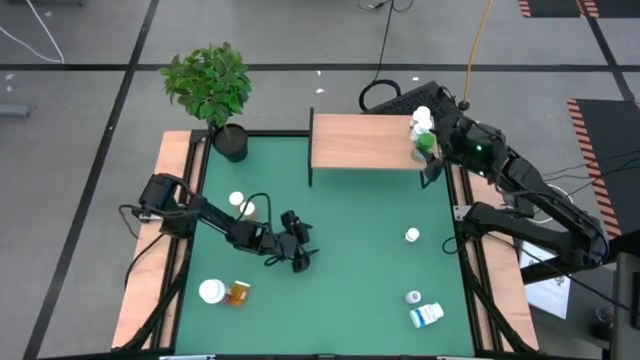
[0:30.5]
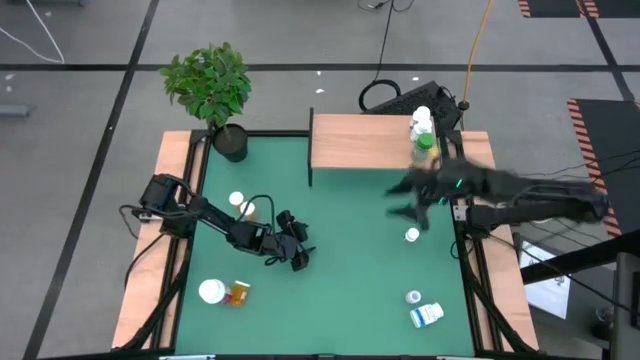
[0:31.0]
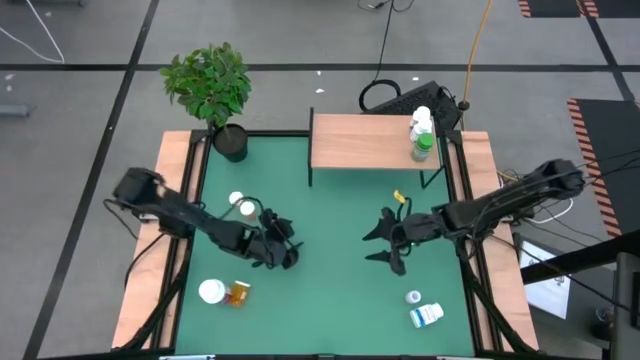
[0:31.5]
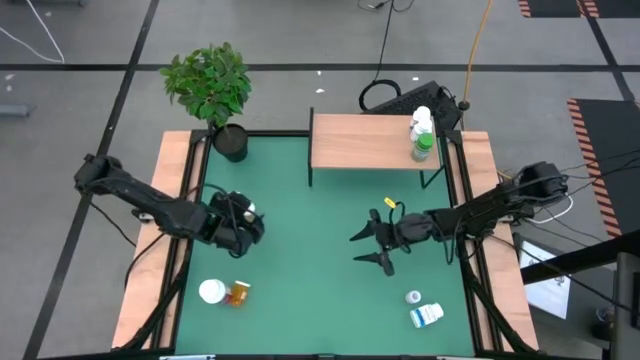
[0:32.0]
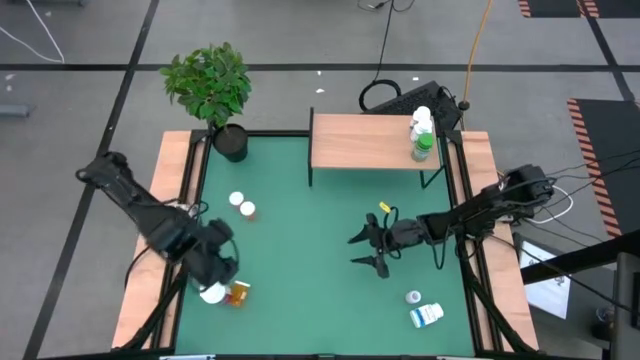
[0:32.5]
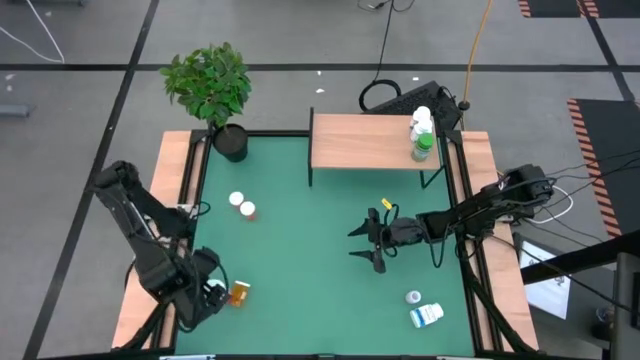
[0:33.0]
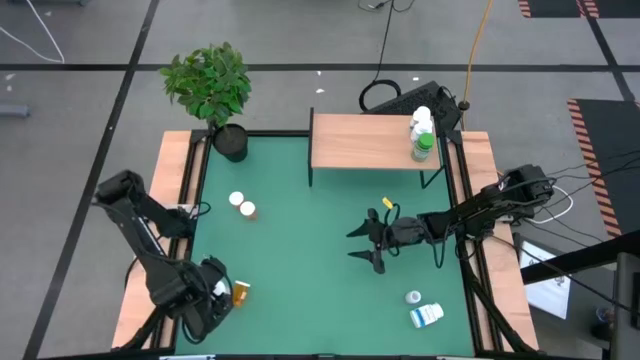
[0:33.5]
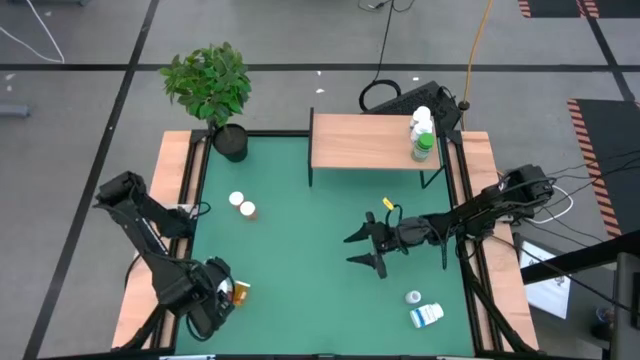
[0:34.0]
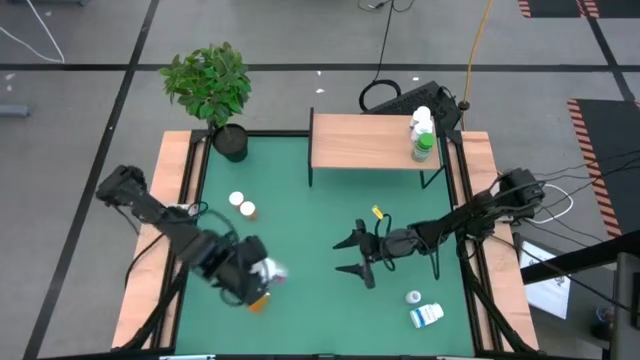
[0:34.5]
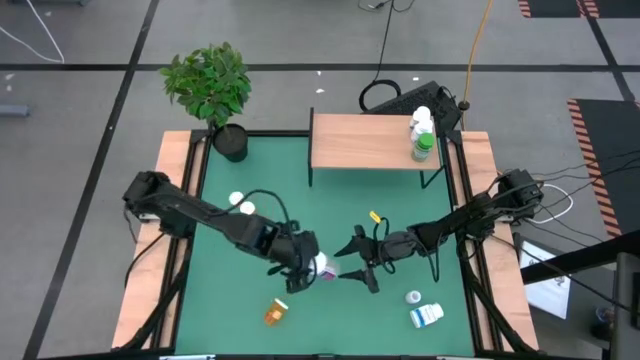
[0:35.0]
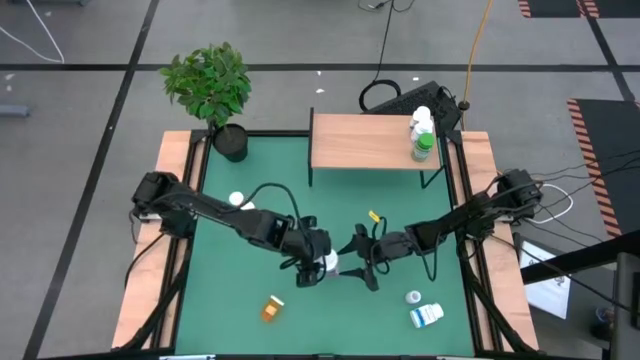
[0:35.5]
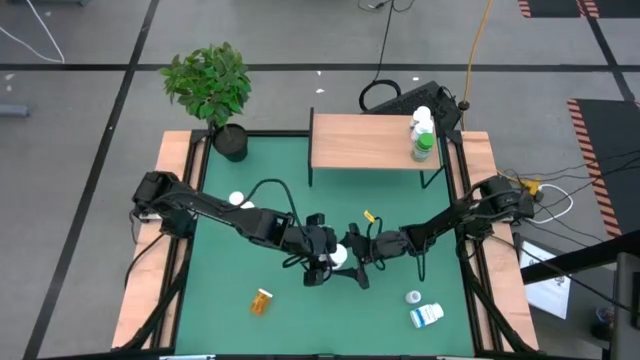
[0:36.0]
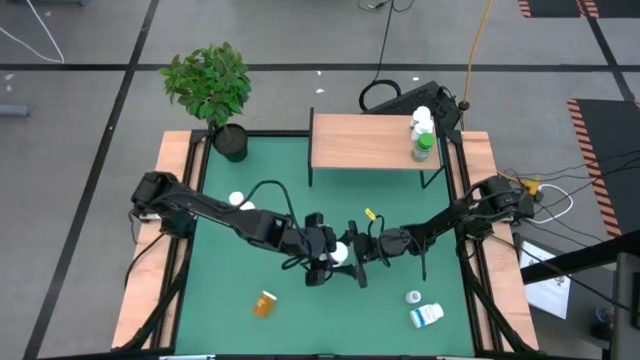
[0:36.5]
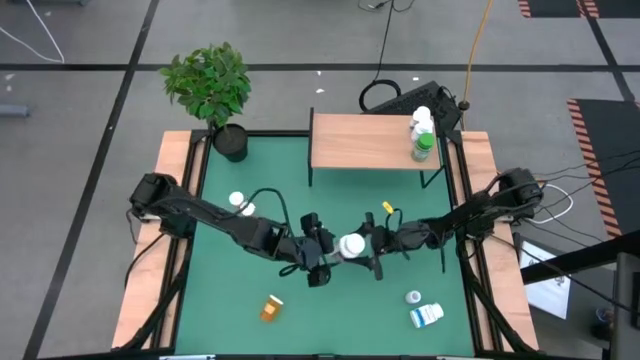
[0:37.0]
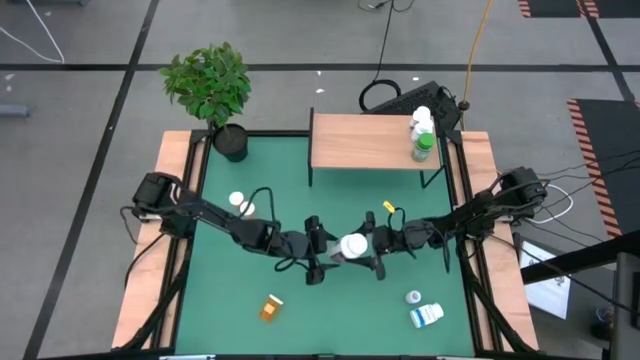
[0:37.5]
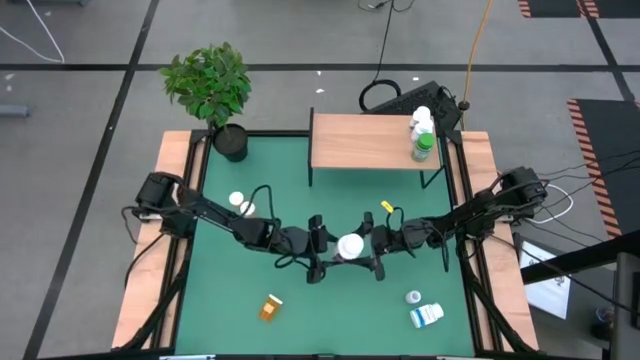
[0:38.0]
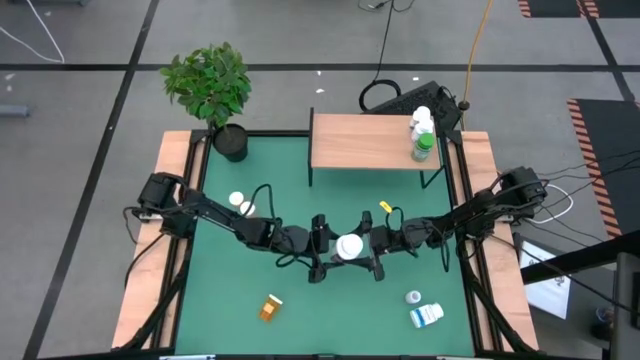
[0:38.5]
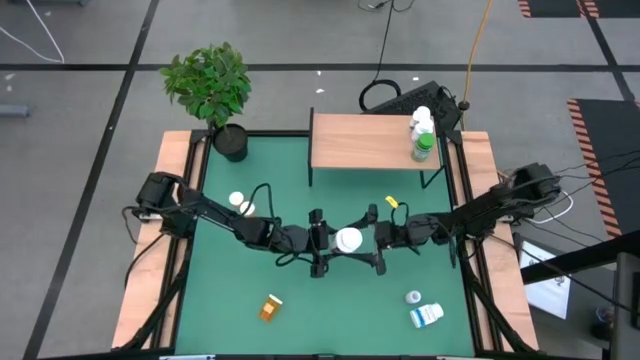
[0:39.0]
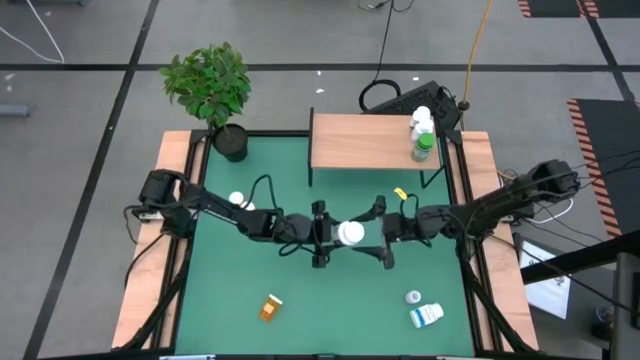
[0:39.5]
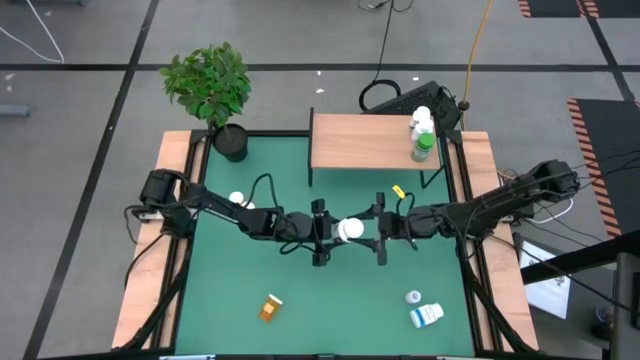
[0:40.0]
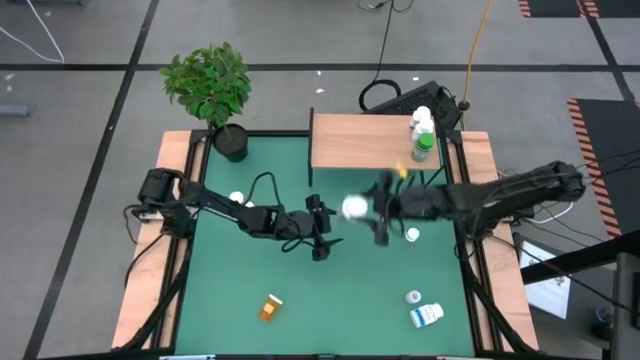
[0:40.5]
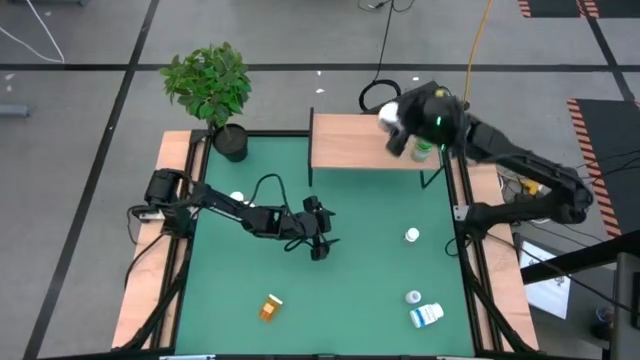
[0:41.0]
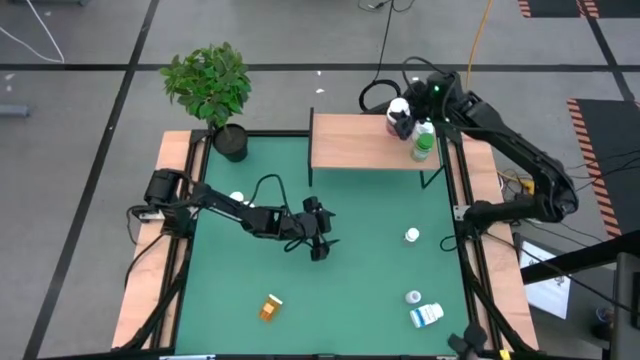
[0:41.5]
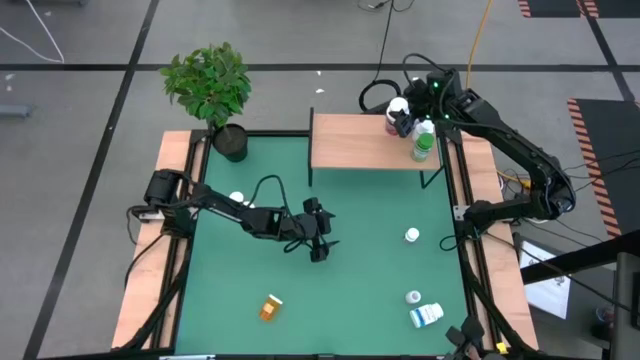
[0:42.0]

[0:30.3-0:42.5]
Task: Pick and place medicine bottles onto shelf by color
Put the violet pill bottle on the shelf

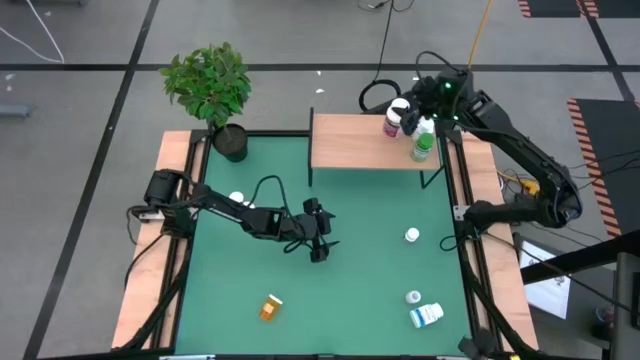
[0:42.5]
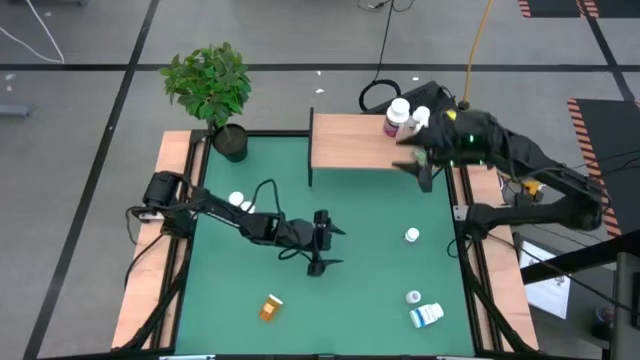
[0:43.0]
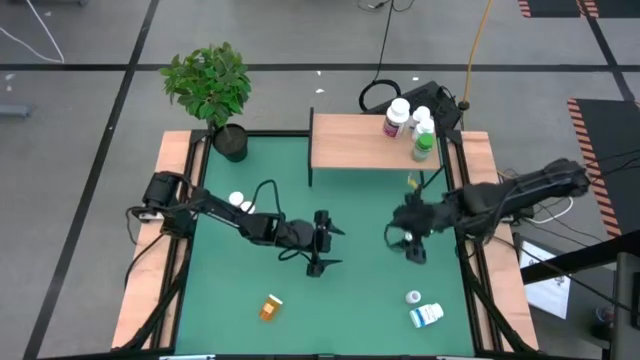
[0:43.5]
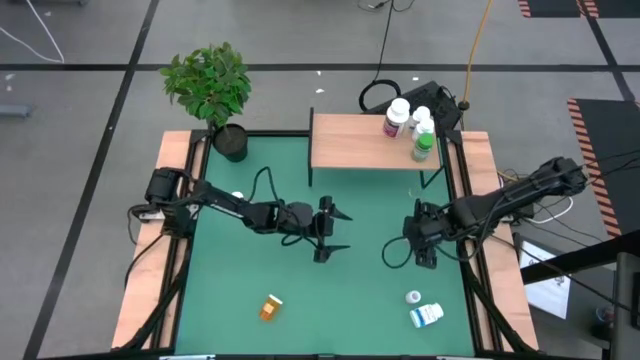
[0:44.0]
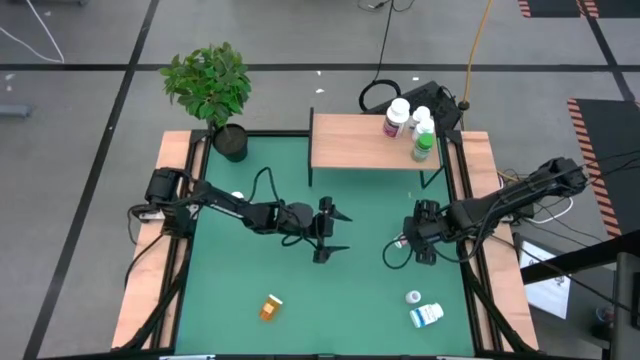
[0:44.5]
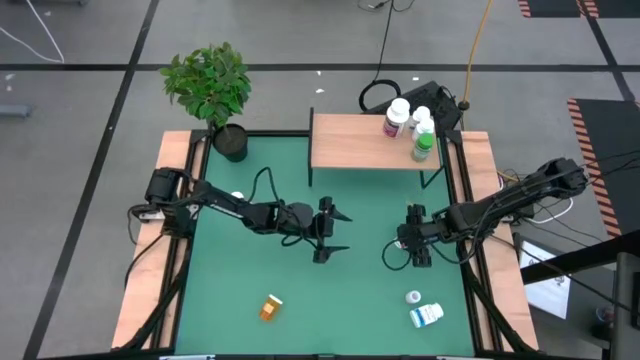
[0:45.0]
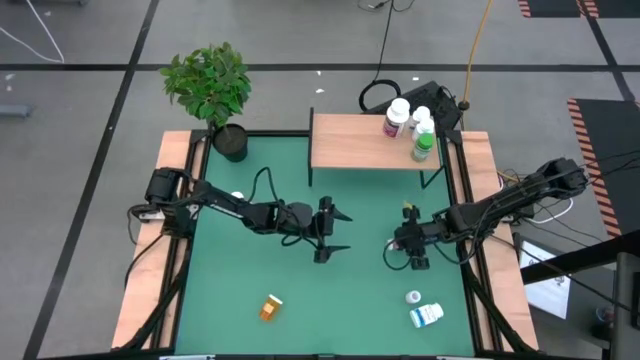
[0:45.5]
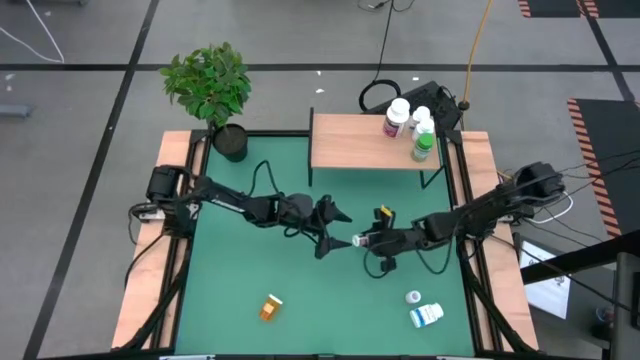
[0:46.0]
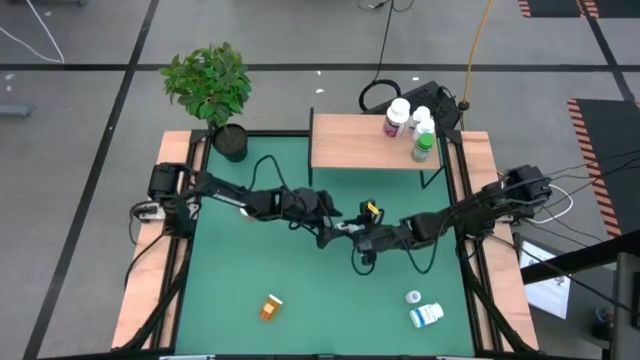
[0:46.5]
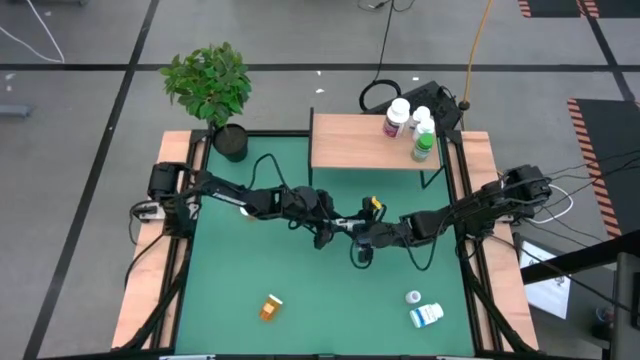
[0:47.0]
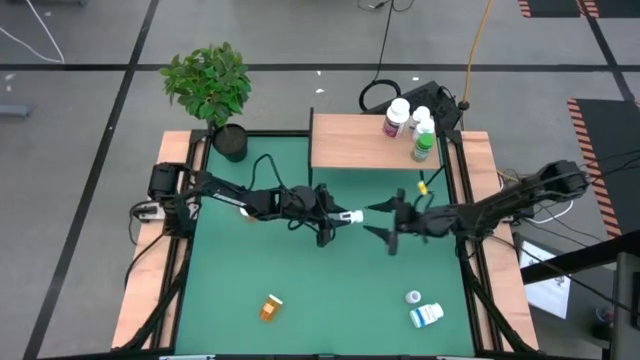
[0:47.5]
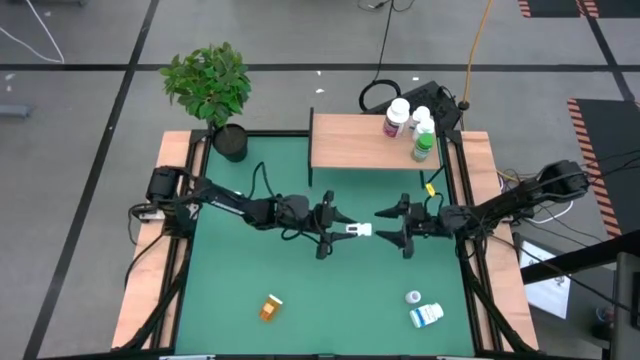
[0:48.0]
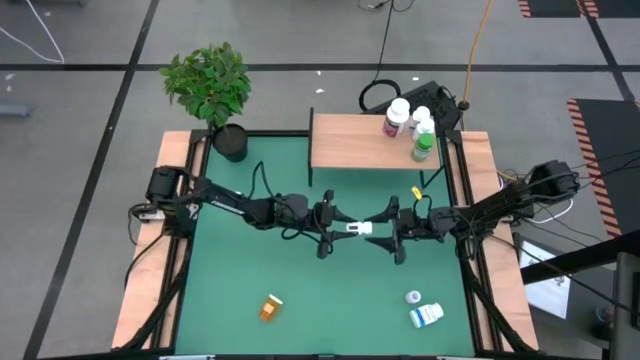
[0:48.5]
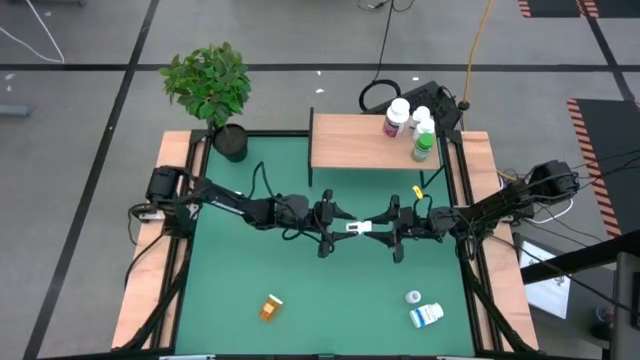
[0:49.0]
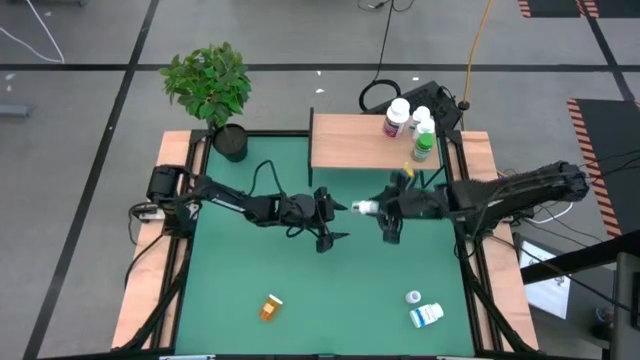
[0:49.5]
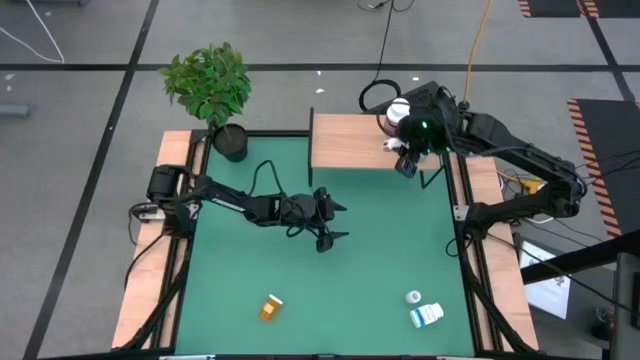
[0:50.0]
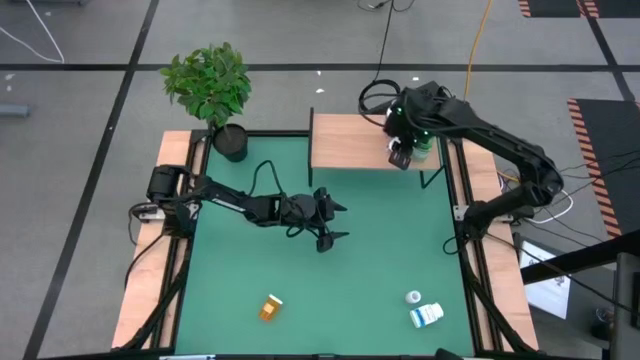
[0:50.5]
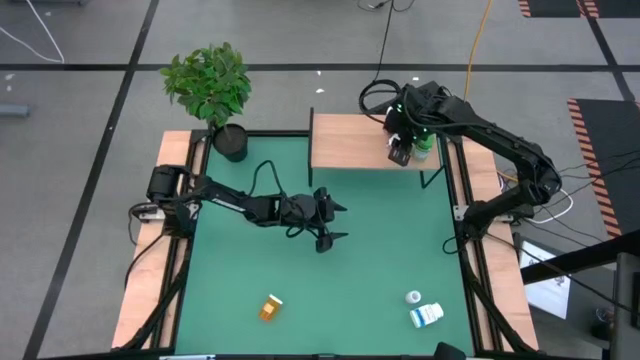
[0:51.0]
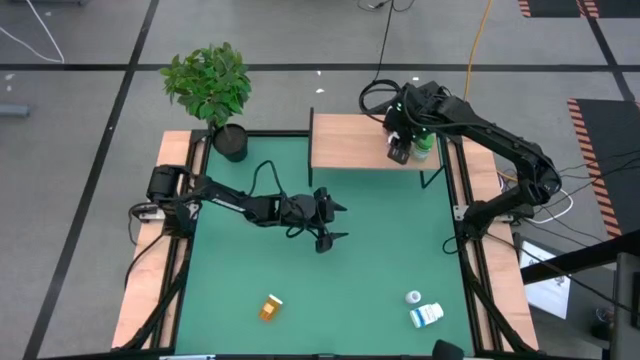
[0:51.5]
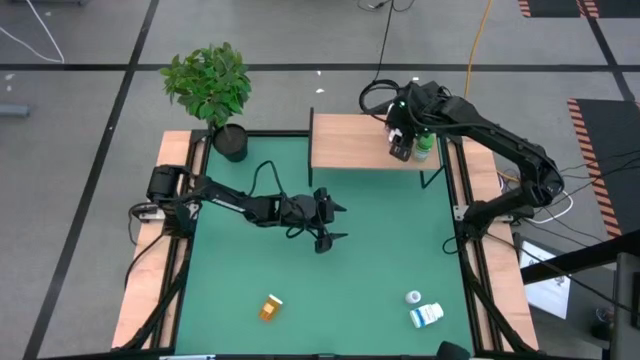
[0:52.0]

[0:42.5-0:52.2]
Put the black pill bottle on the shelf
